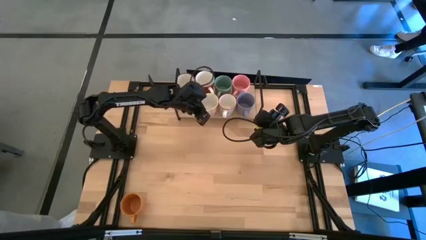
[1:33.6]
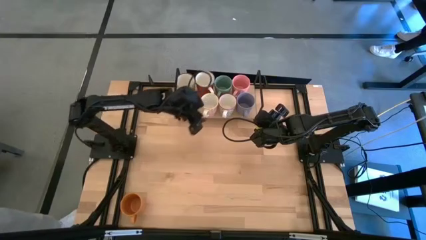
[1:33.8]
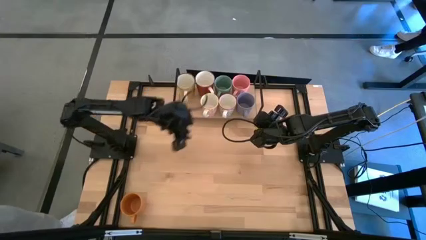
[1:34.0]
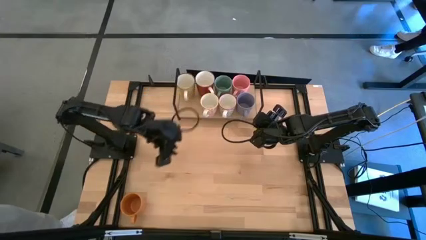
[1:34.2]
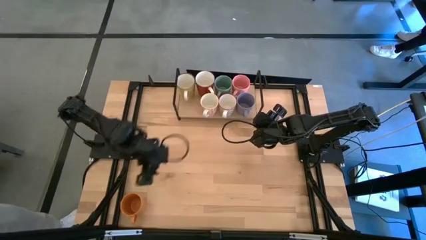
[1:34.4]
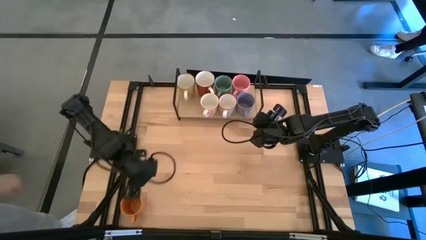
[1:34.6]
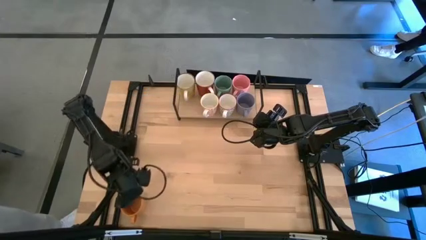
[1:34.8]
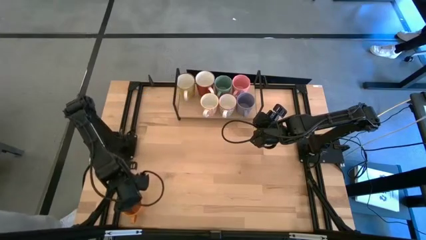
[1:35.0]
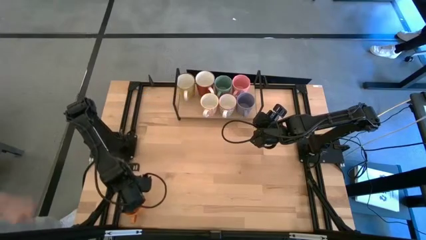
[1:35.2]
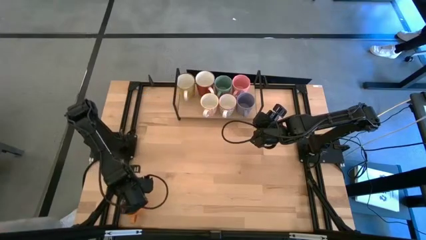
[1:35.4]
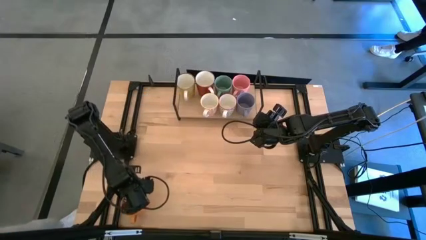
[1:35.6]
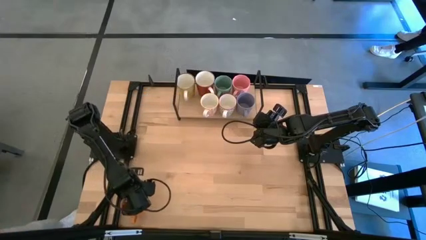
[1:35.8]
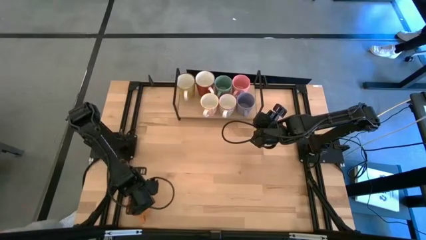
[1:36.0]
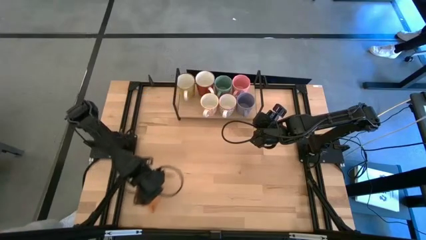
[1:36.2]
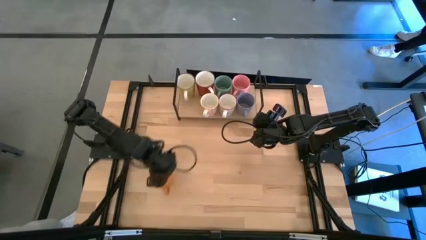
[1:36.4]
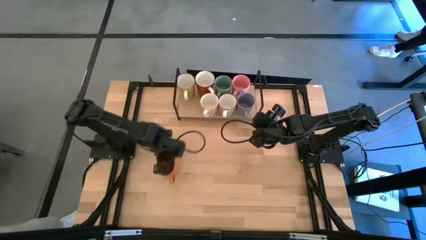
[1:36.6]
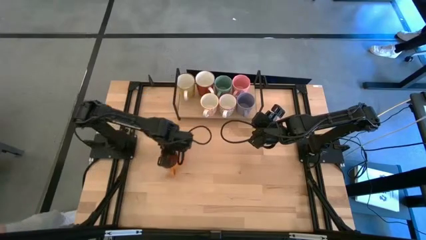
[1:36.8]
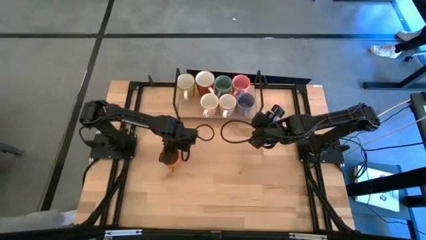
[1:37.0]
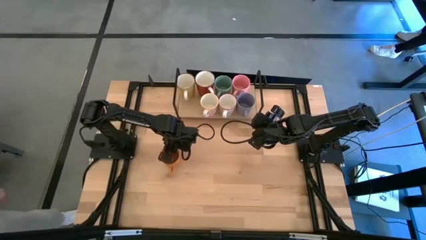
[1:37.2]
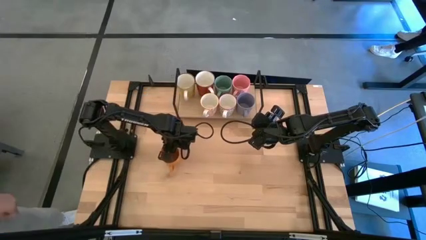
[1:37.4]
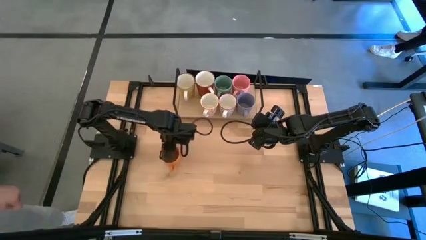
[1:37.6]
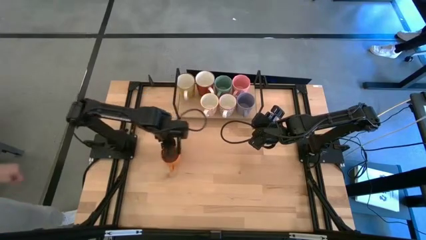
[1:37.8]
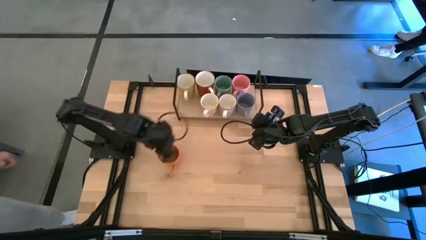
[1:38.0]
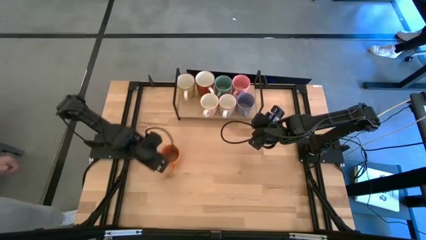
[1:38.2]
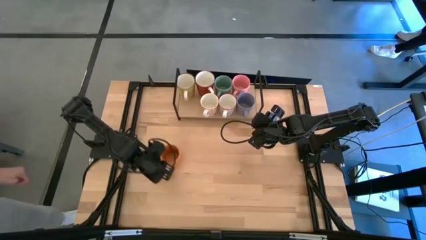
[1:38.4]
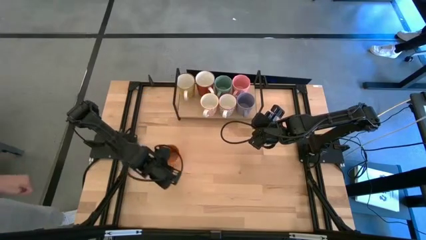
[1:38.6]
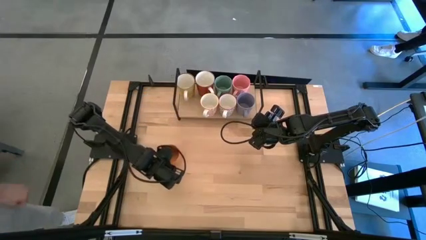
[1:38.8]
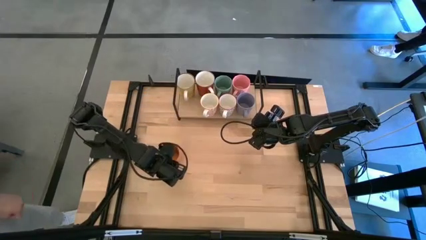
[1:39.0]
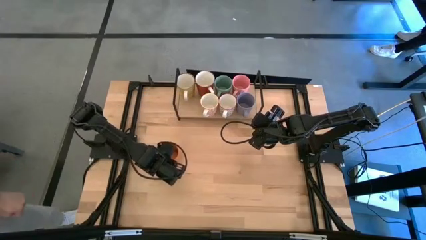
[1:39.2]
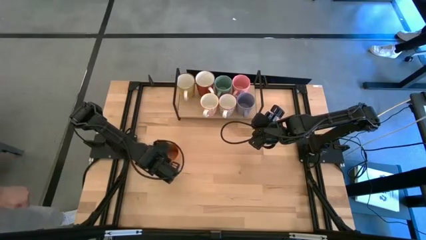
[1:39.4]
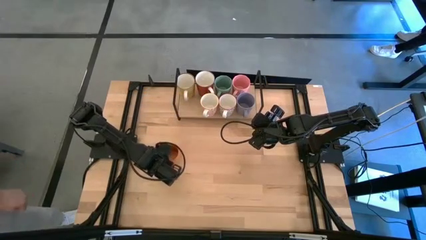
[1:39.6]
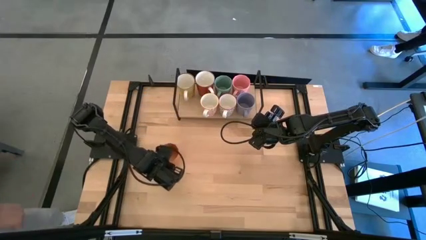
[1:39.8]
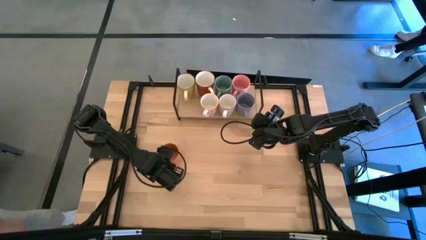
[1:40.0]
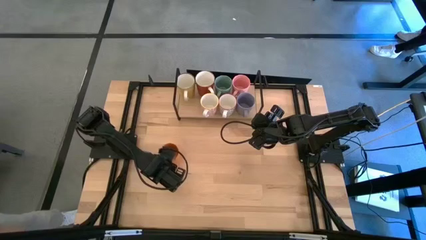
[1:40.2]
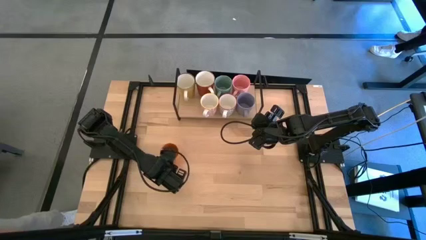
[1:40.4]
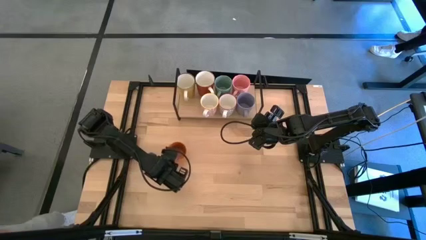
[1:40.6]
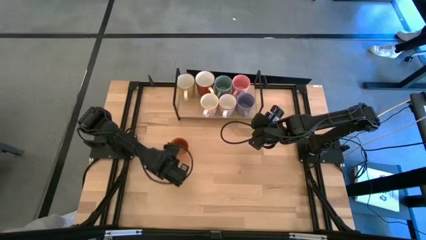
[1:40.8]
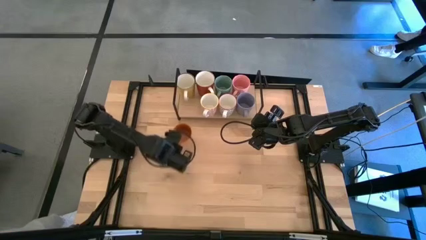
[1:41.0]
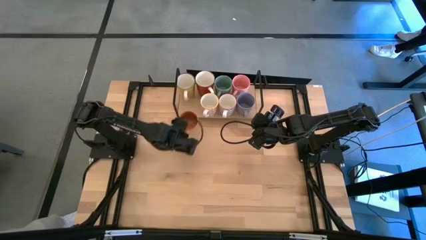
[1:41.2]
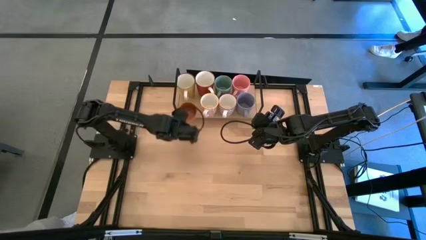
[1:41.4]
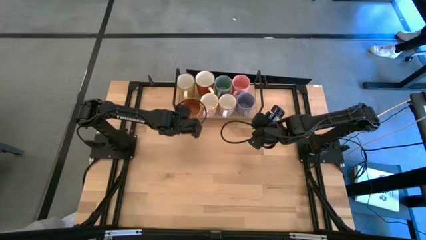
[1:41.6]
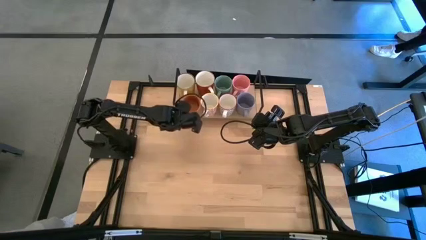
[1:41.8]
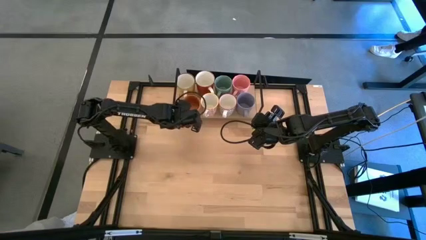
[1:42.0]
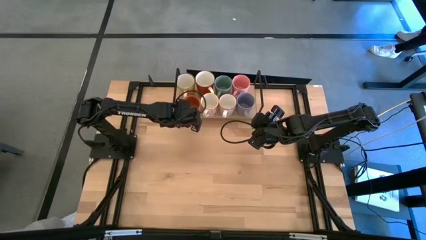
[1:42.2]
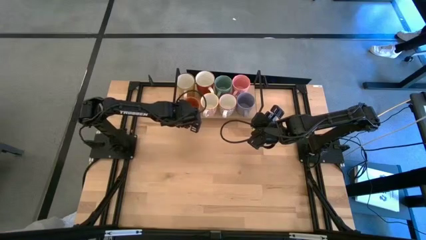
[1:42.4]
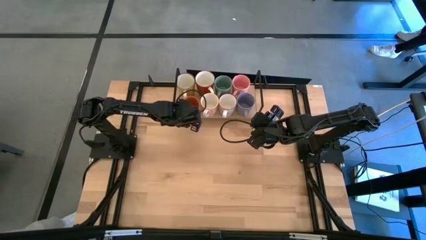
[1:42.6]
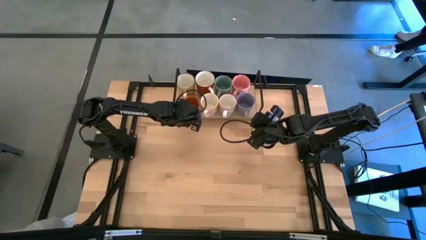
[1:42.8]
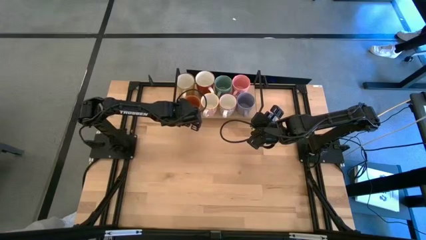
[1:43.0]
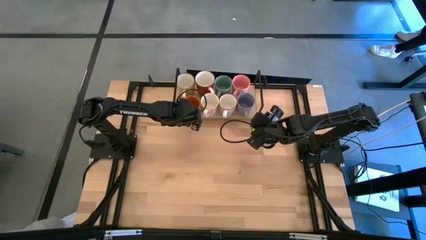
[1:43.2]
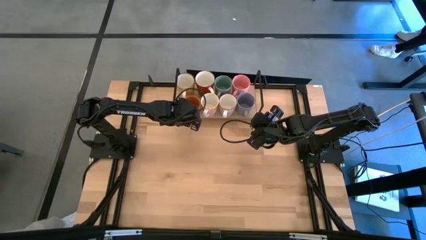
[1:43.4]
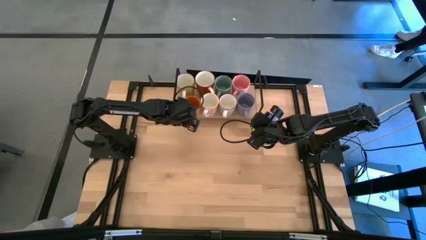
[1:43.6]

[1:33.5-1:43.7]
Task: Place coffee mugs
Put the orange mug on the shelf

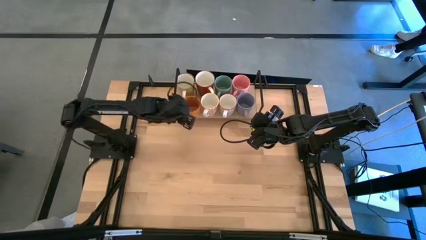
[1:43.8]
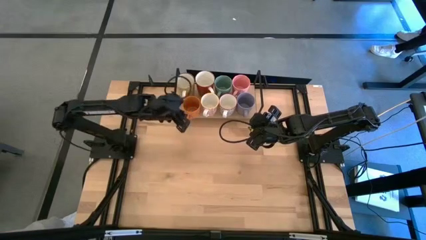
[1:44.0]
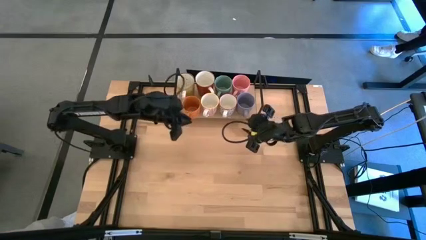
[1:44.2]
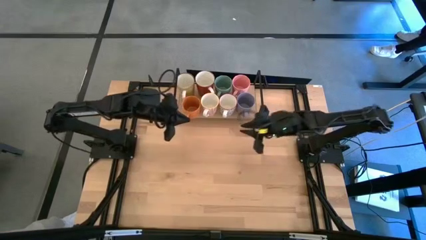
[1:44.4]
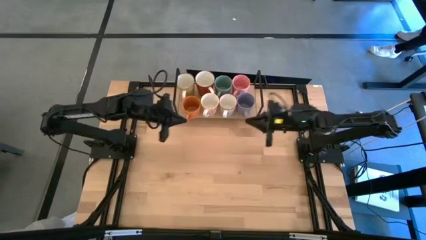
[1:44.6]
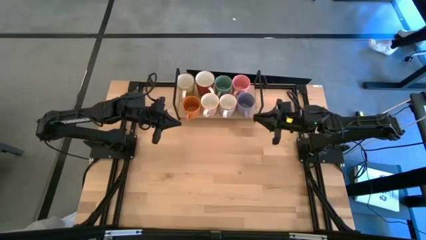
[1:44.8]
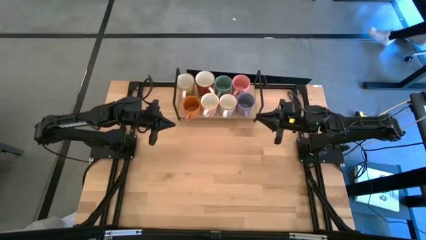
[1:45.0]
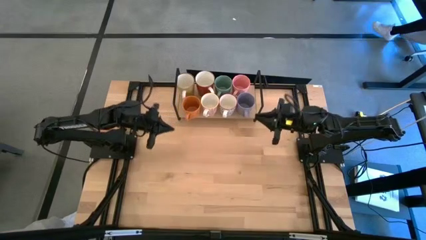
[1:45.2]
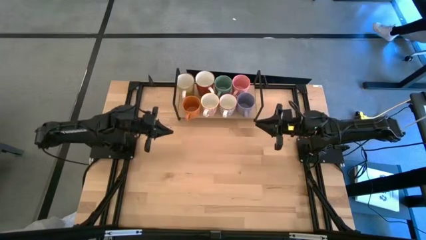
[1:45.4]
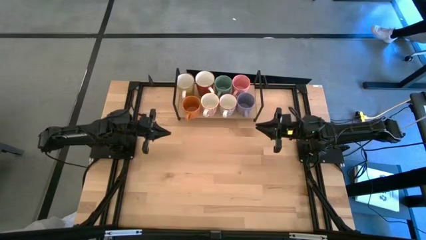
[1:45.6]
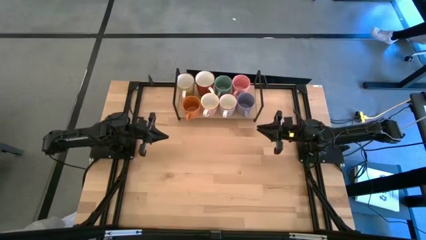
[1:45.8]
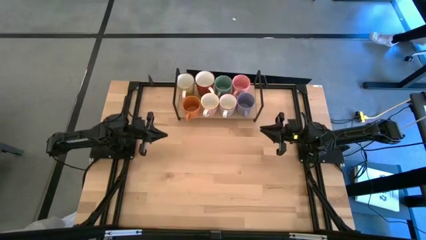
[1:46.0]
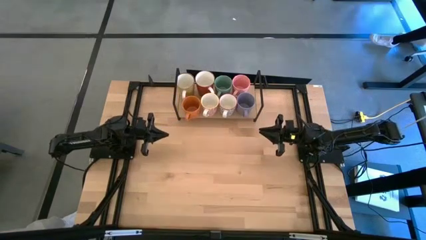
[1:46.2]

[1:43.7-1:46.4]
Return to Home Position

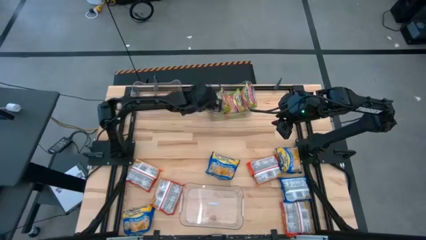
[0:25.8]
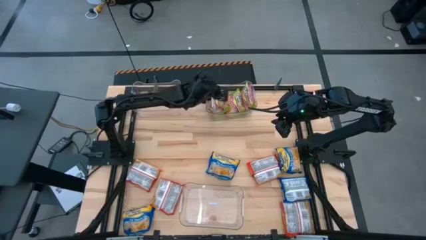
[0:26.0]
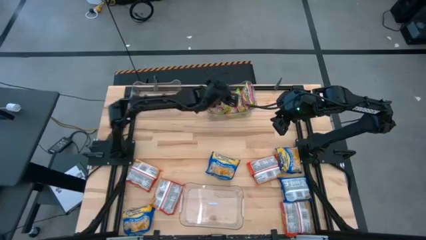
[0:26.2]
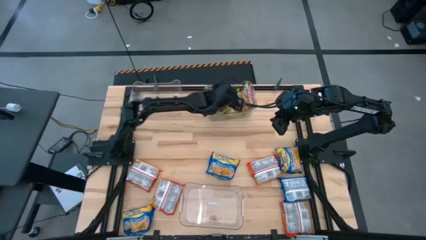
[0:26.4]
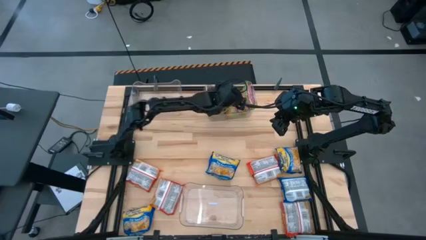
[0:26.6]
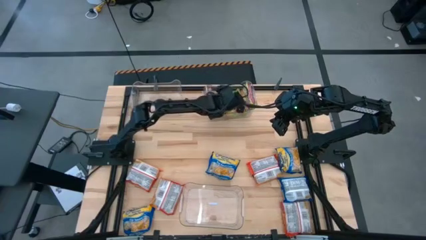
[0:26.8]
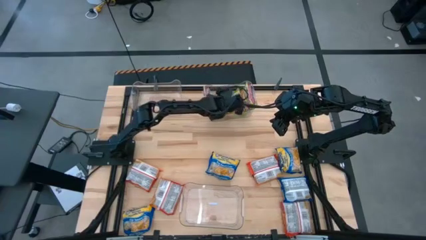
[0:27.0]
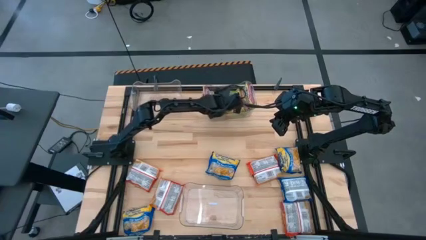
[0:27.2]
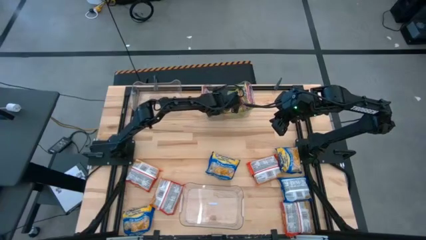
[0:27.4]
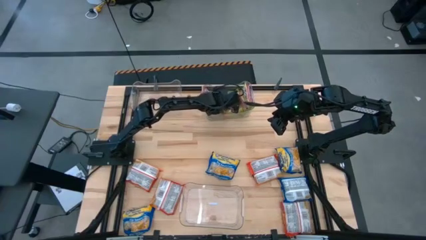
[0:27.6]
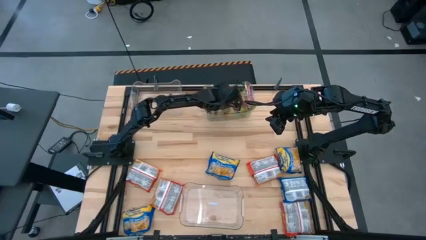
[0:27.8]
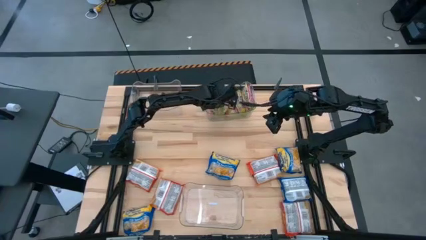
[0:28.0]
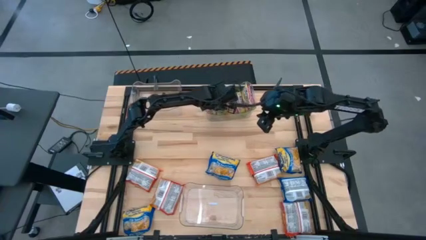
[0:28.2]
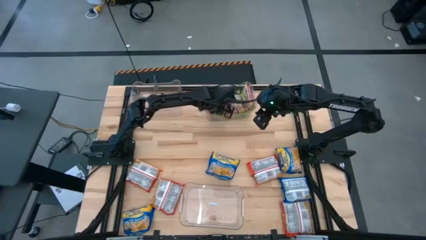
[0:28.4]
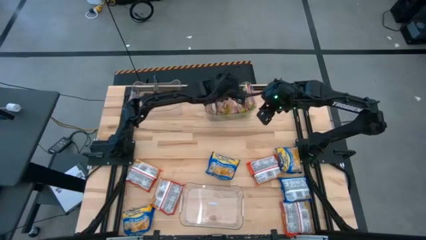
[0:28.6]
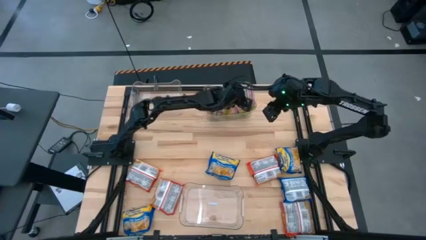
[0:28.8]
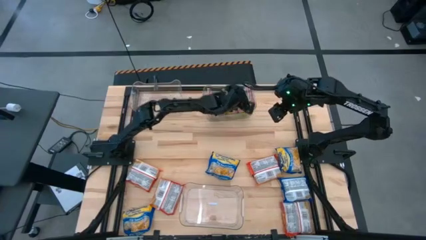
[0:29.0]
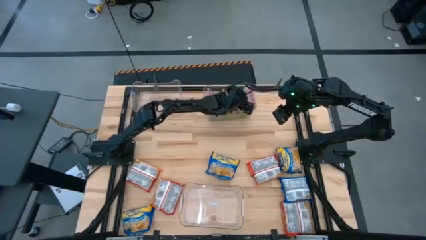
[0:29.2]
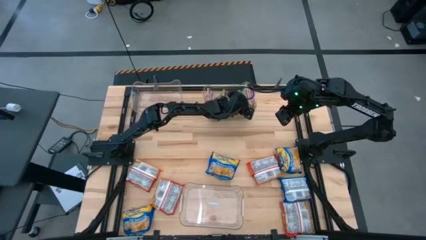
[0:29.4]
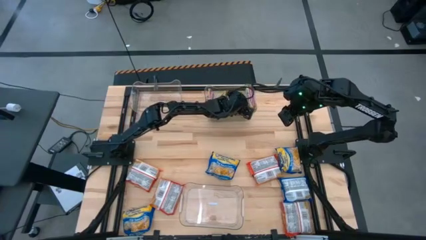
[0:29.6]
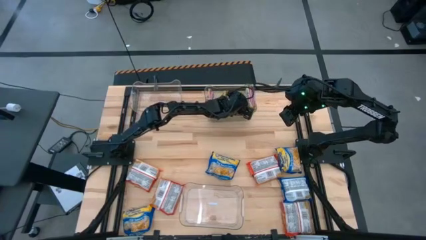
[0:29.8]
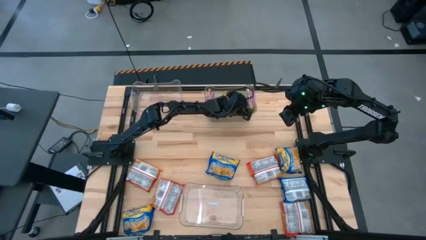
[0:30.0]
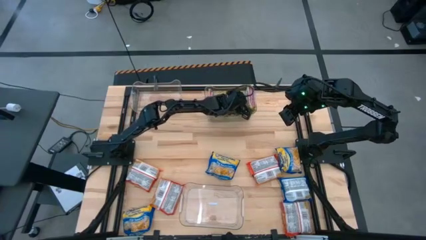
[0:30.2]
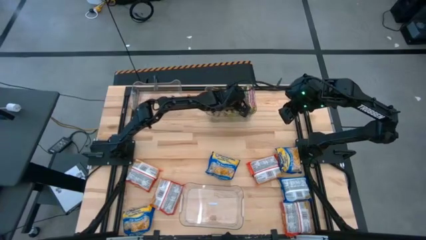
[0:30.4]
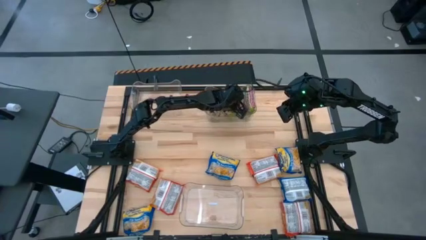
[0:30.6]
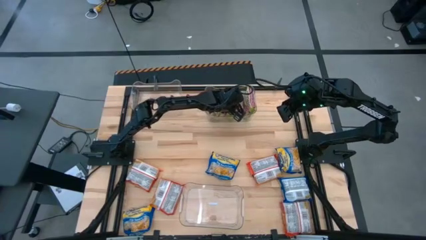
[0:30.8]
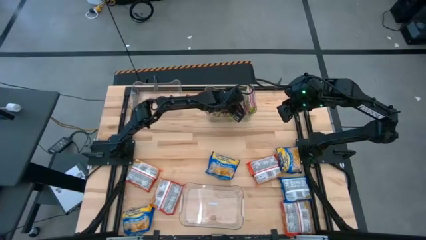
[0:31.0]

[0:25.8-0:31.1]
Task: Sort Maruchan noodles
Adjust the green noodle packs
